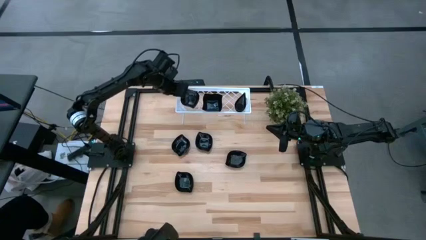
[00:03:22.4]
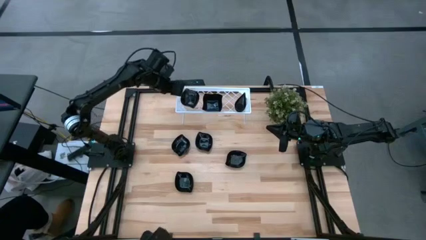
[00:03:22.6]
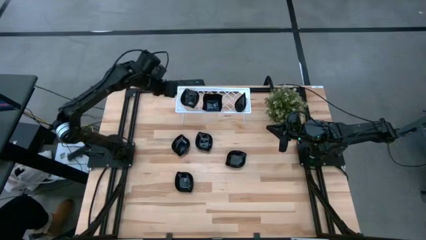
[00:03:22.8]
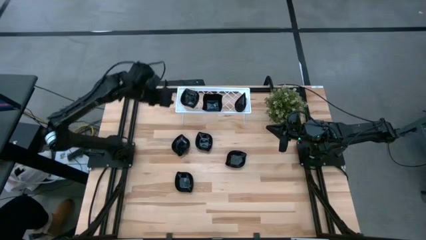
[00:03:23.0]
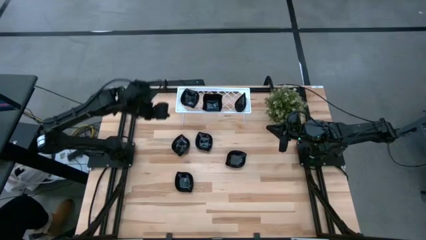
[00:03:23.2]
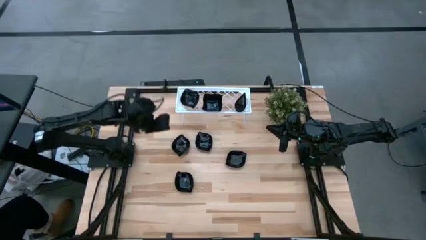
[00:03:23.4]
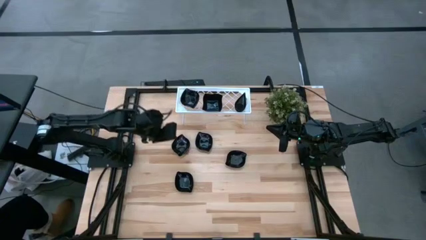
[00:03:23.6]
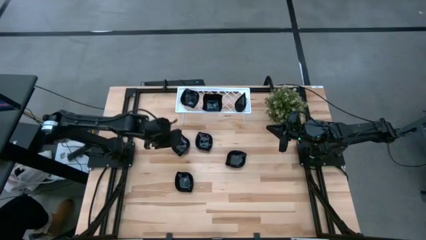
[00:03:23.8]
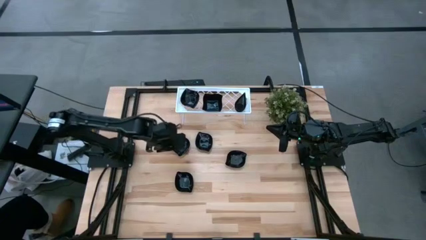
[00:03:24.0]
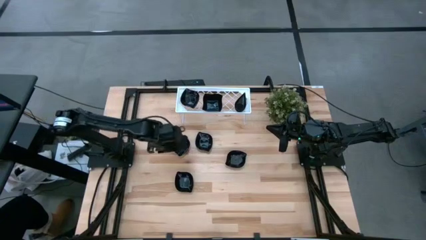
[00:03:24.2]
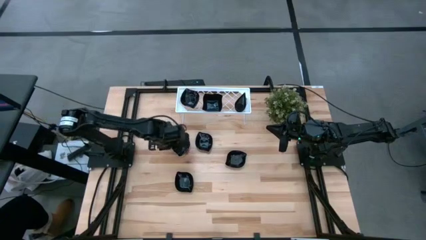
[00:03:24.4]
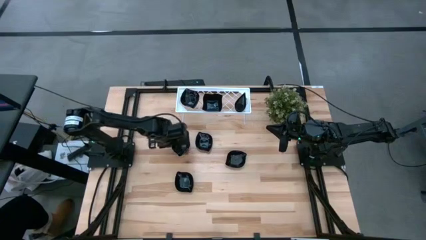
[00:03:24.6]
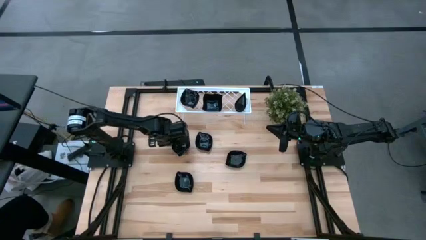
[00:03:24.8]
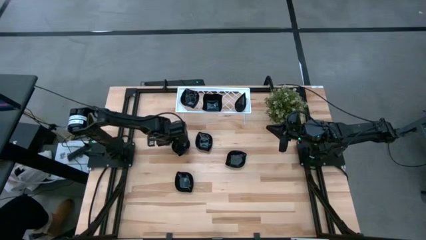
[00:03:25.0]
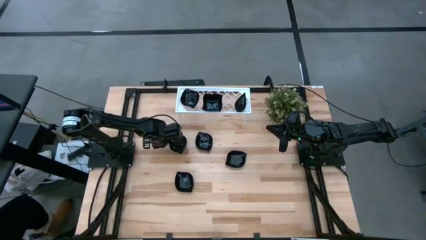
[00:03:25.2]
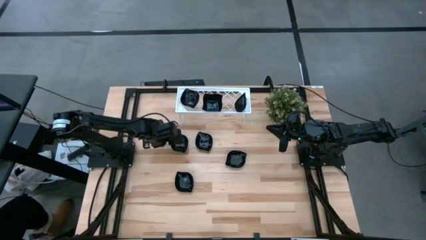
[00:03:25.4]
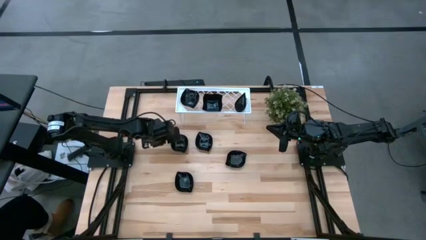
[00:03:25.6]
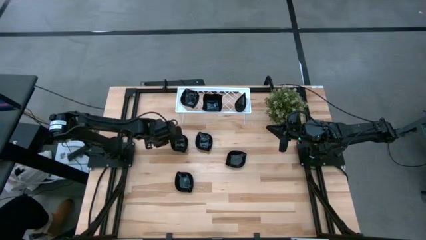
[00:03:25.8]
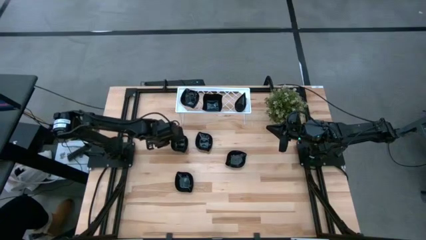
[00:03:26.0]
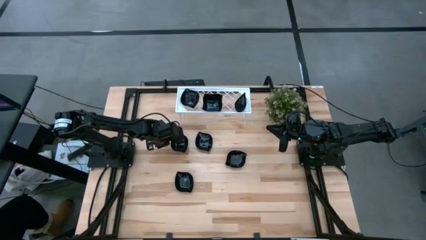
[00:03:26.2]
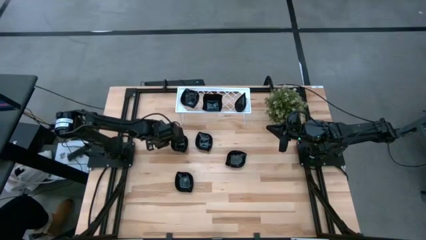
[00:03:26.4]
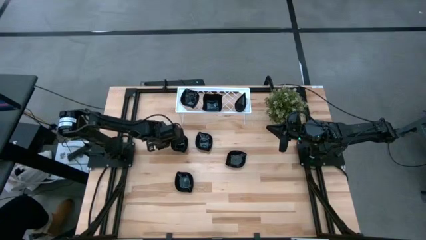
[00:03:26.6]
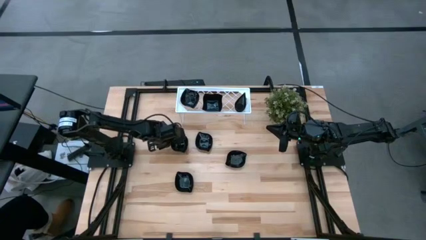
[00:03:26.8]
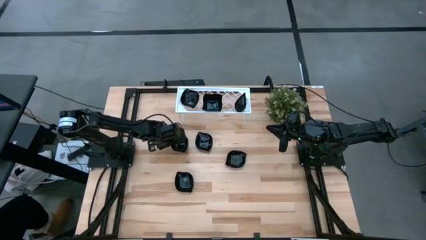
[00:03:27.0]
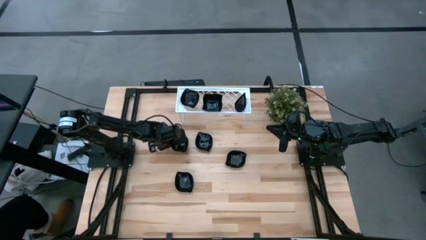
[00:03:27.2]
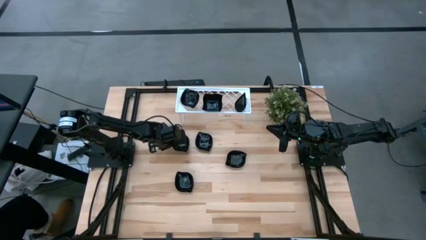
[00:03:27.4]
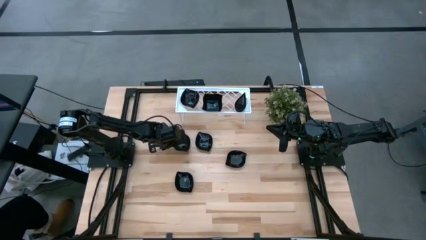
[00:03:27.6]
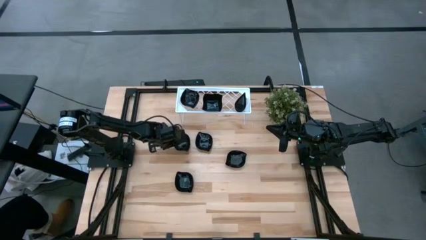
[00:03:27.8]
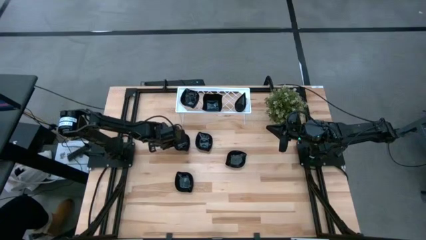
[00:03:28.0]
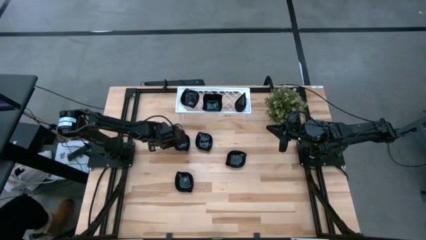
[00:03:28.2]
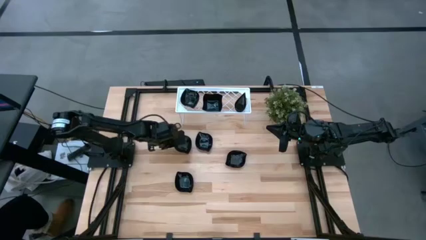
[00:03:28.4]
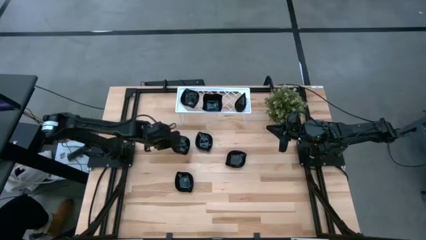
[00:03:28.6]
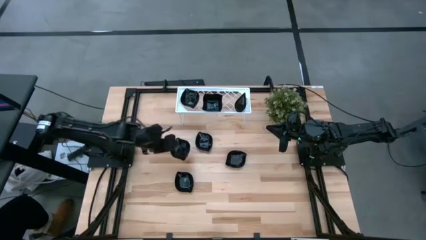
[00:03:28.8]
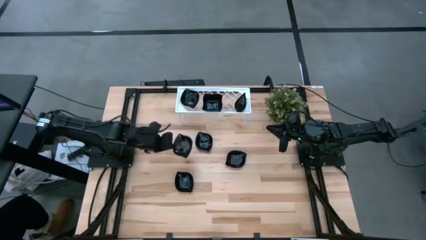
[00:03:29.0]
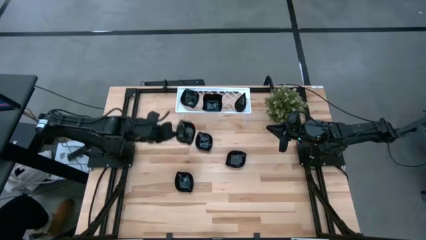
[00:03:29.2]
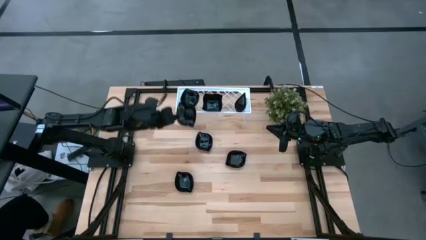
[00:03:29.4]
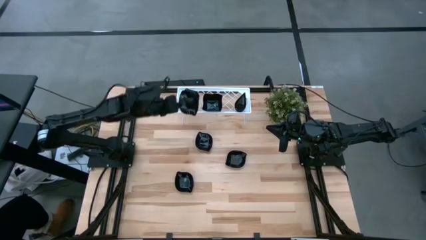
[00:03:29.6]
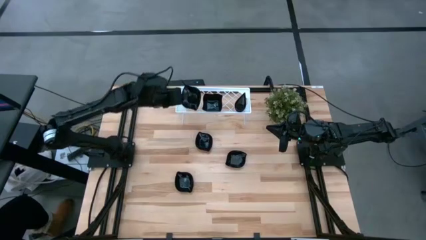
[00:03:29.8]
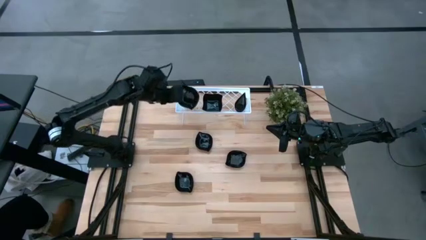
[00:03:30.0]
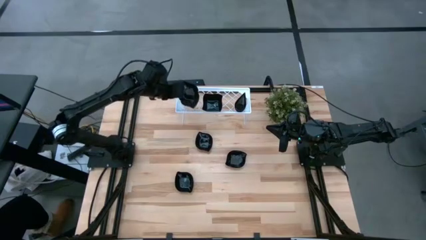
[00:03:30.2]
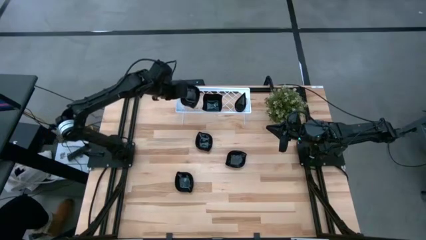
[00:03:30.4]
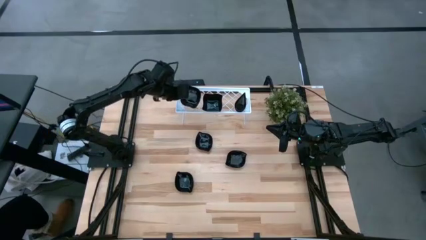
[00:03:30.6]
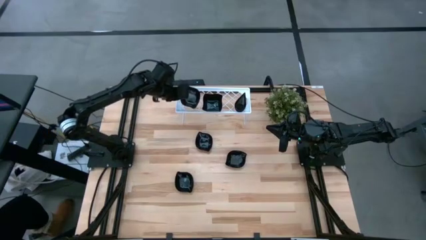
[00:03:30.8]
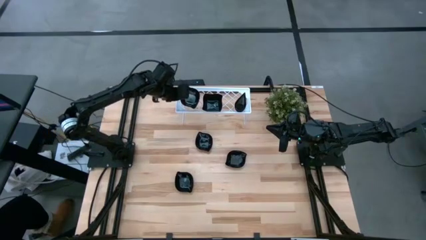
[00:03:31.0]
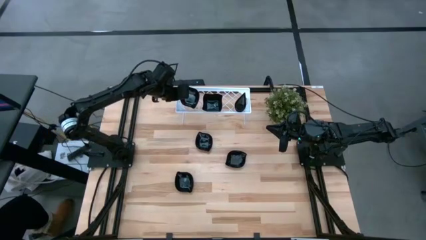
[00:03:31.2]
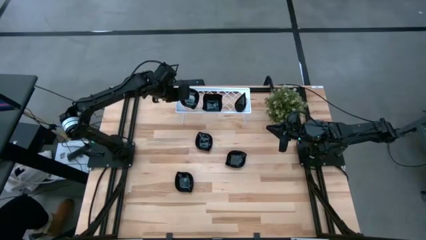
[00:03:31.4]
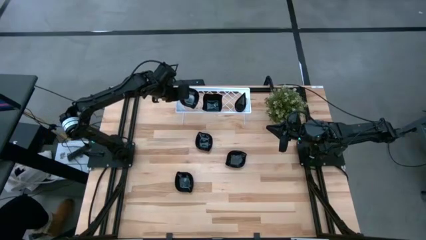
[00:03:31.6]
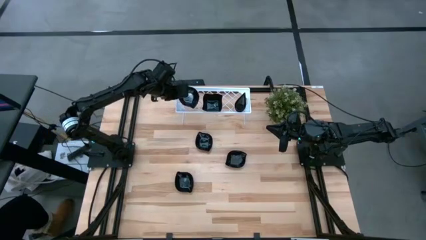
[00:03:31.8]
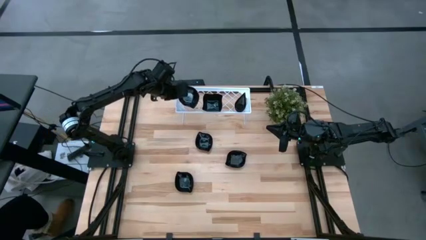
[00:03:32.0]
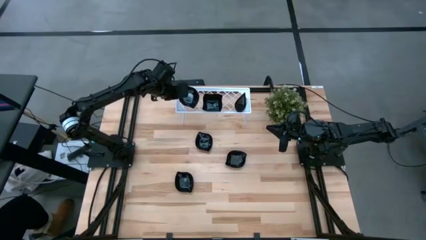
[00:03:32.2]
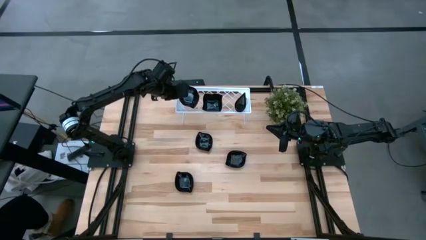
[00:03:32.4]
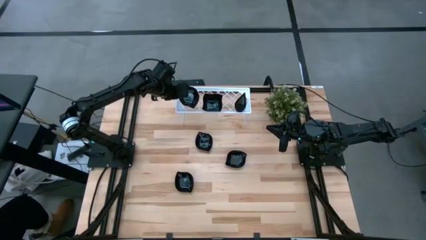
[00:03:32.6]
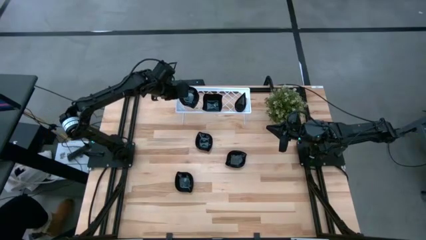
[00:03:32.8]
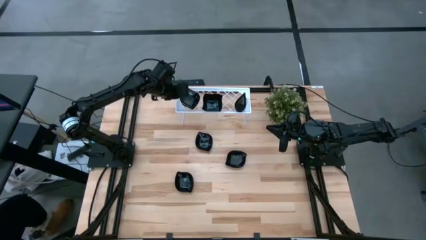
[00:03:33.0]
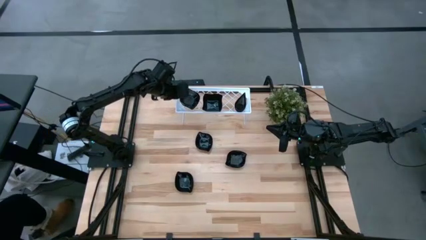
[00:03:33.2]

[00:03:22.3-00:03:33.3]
Task: Pick & Place Mini shaped plates
Stack the leaf-shaped plate on top of the leaf-shaped plate on the shelf
